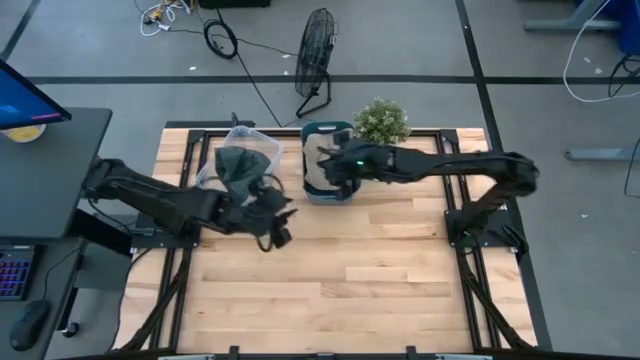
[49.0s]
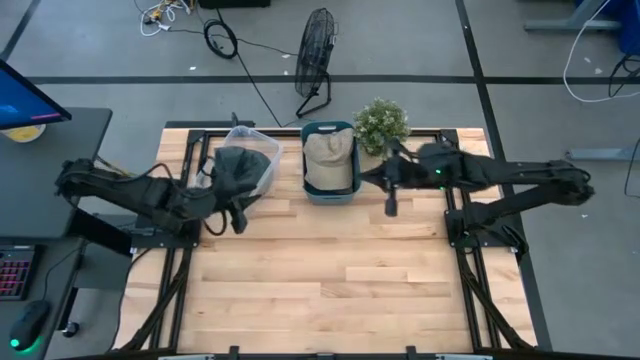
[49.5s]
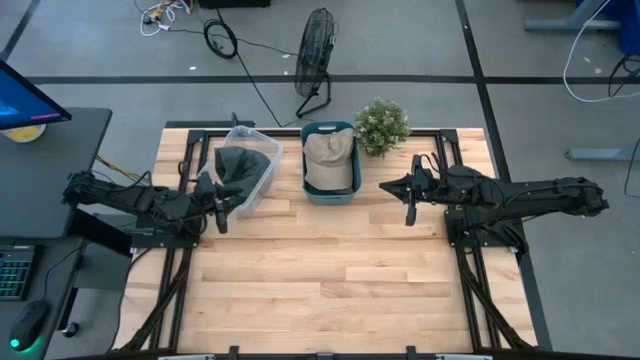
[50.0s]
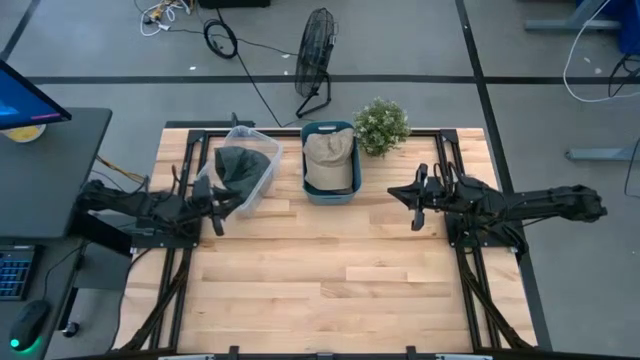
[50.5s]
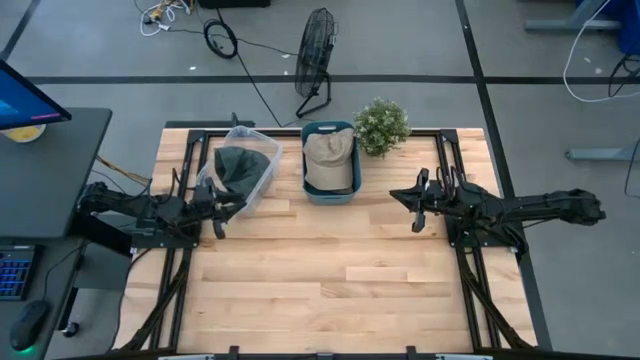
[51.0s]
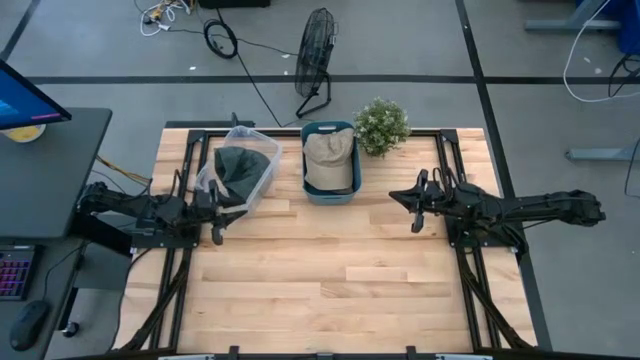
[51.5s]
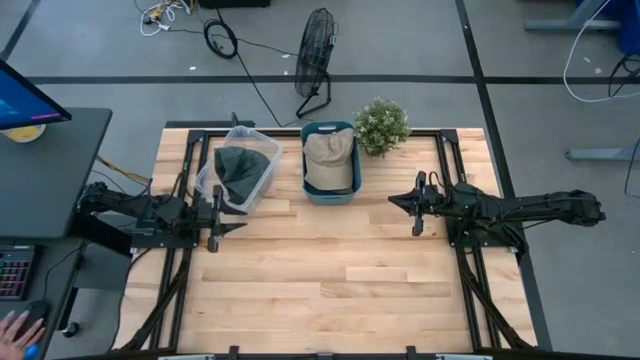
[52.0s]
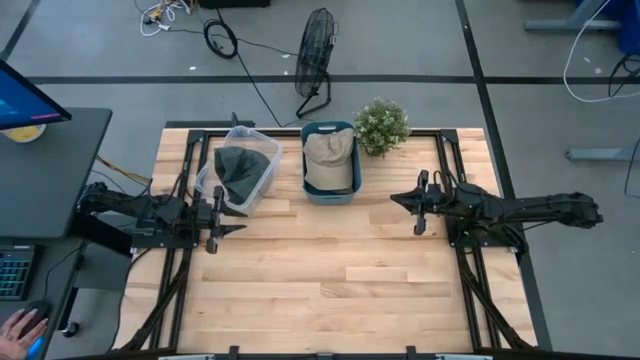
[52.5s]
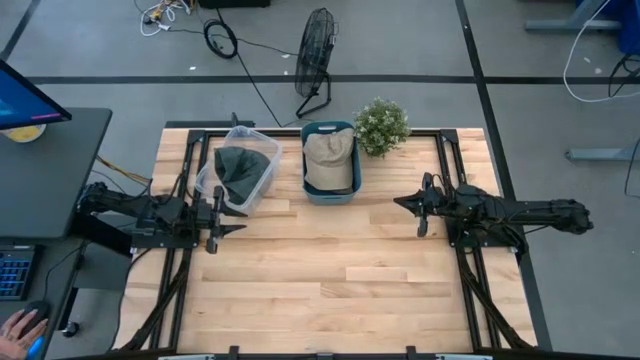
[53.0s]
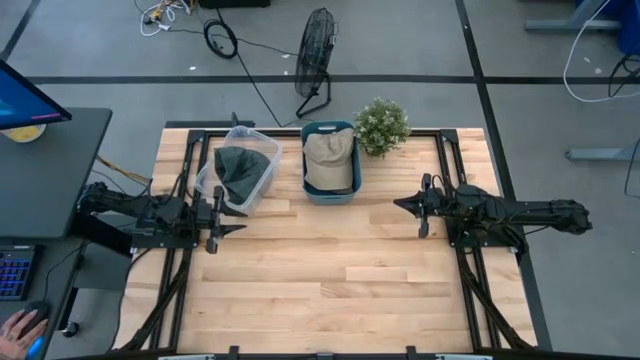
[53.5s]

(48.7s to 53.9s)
Task: Pick & Place hat
Return to Home Position

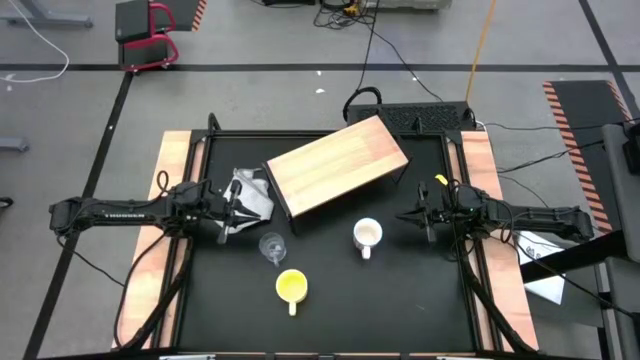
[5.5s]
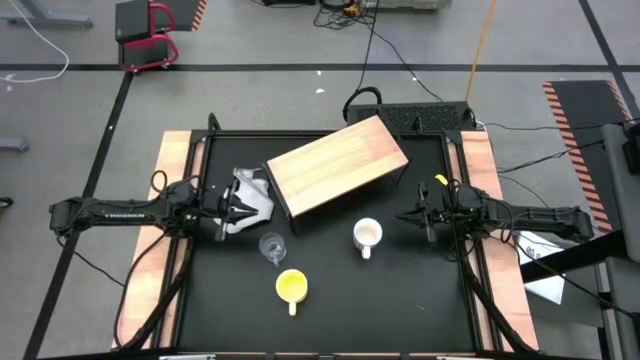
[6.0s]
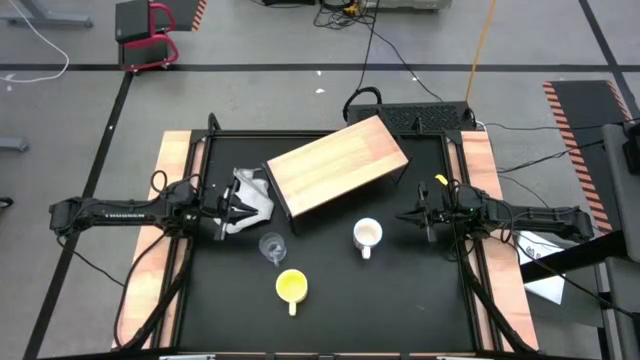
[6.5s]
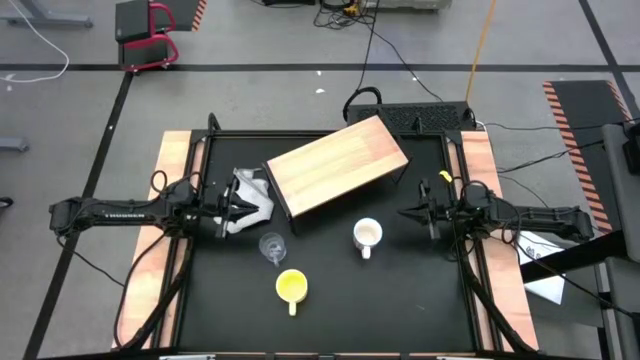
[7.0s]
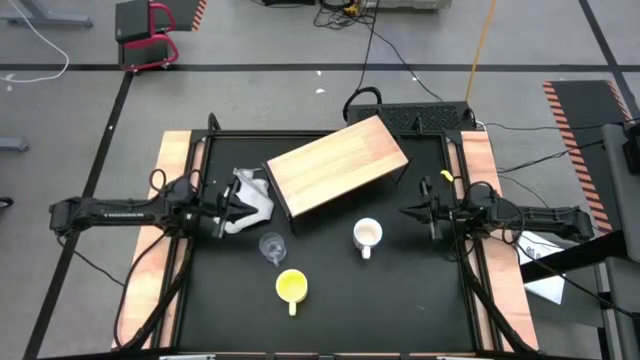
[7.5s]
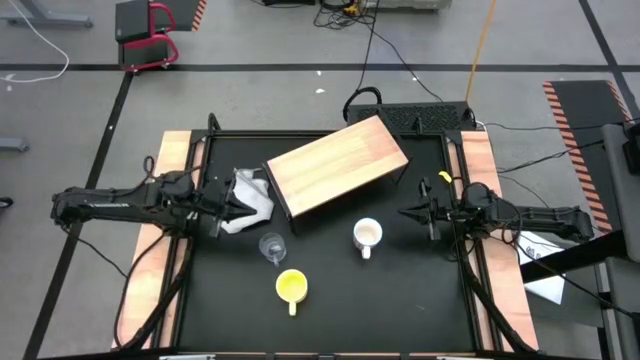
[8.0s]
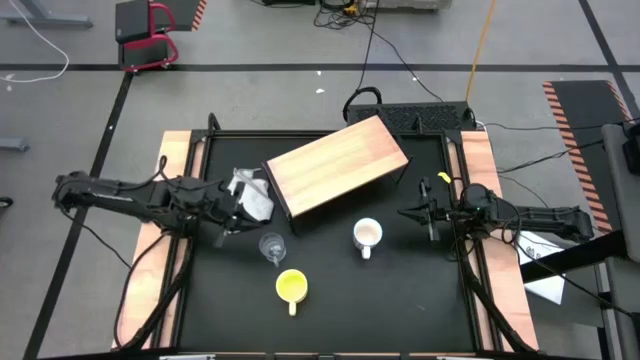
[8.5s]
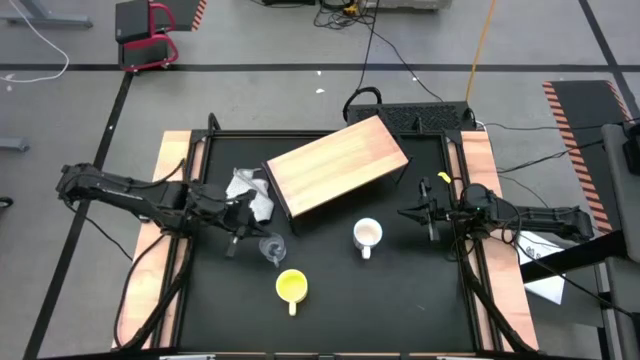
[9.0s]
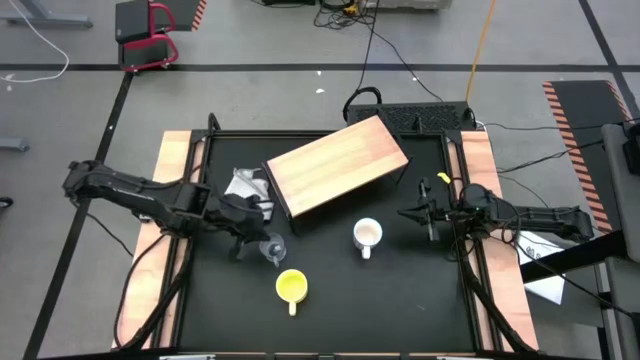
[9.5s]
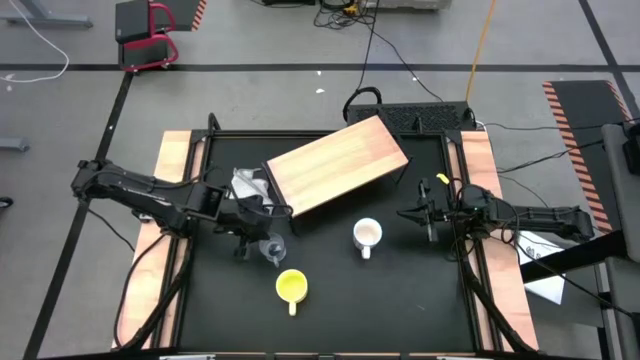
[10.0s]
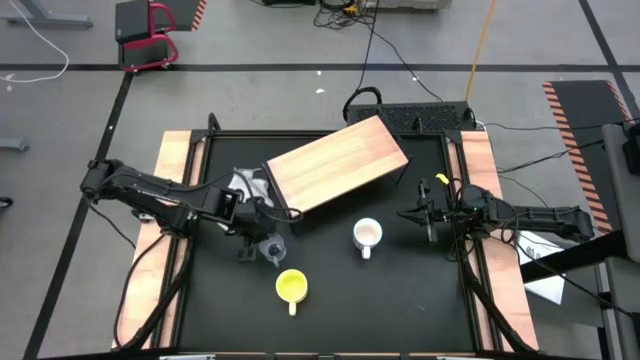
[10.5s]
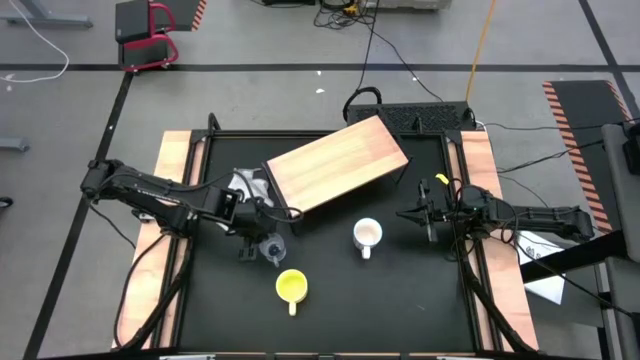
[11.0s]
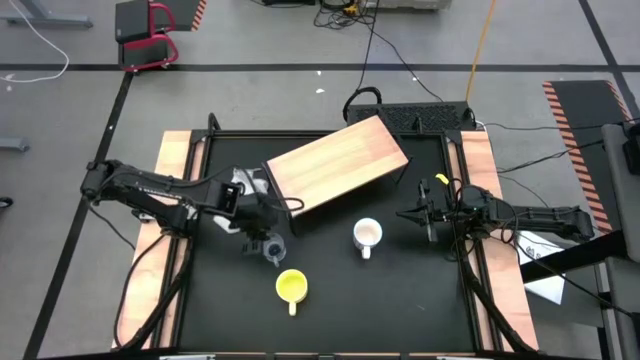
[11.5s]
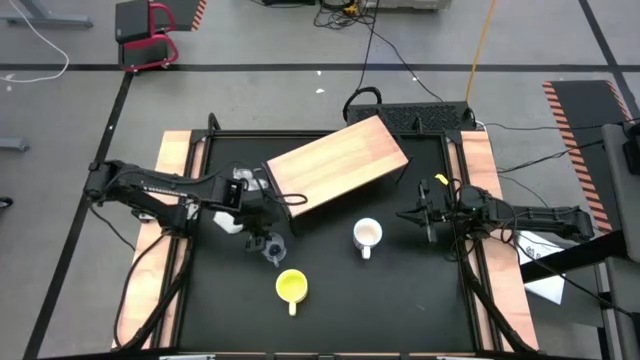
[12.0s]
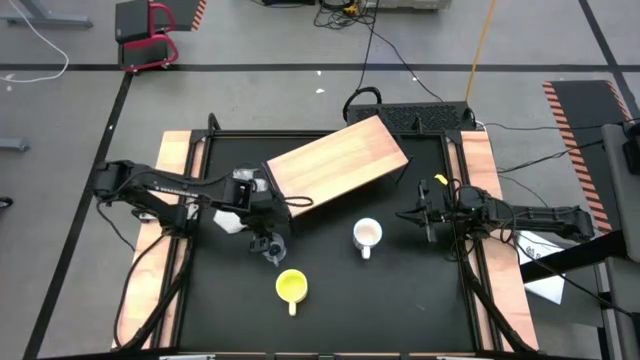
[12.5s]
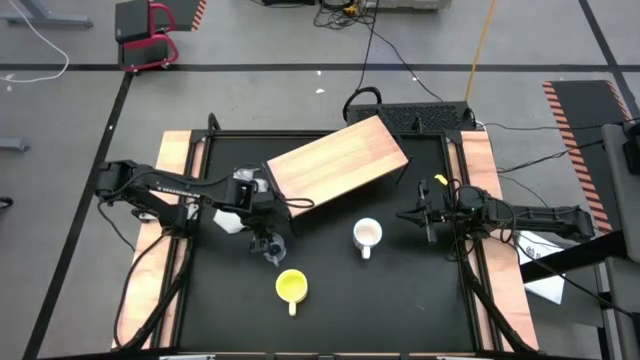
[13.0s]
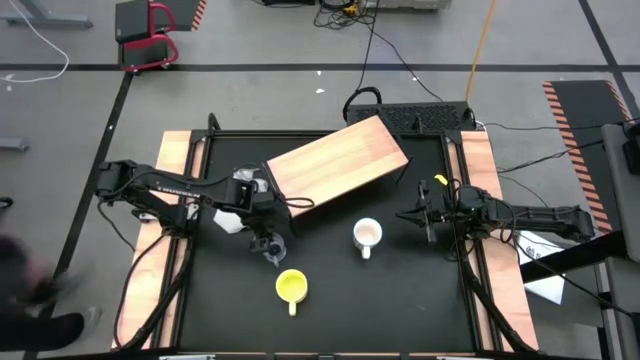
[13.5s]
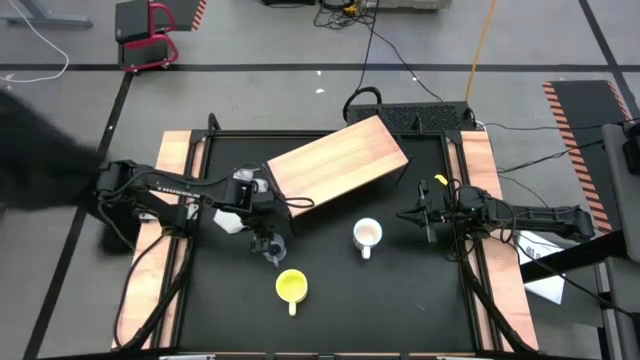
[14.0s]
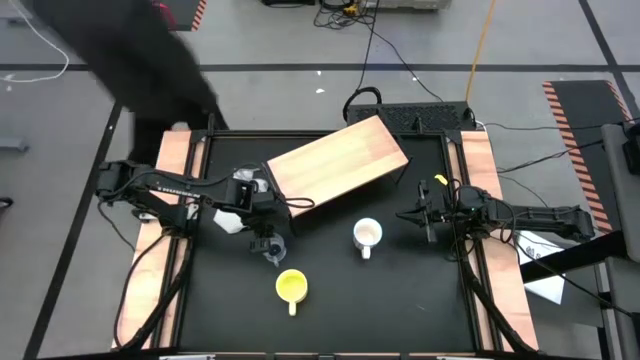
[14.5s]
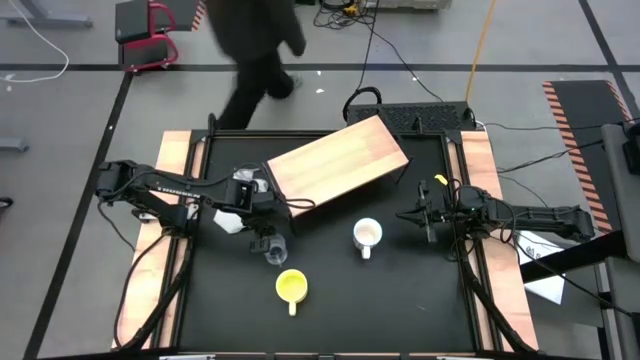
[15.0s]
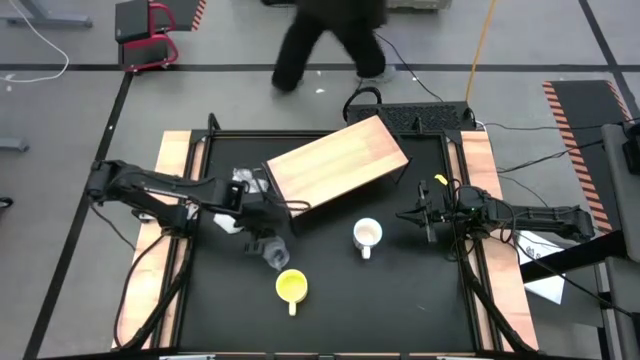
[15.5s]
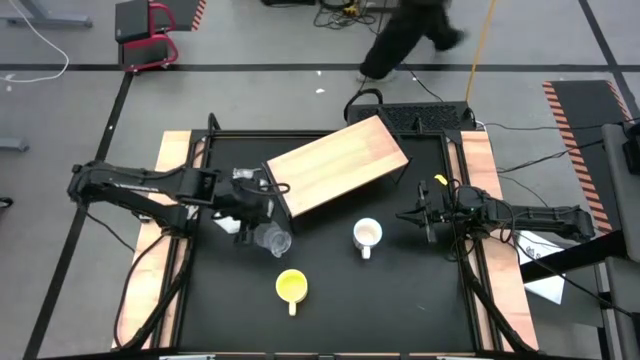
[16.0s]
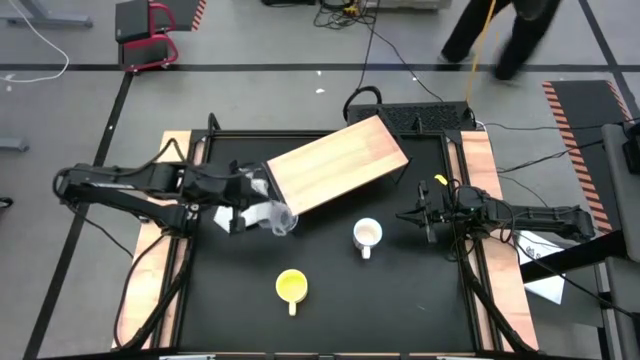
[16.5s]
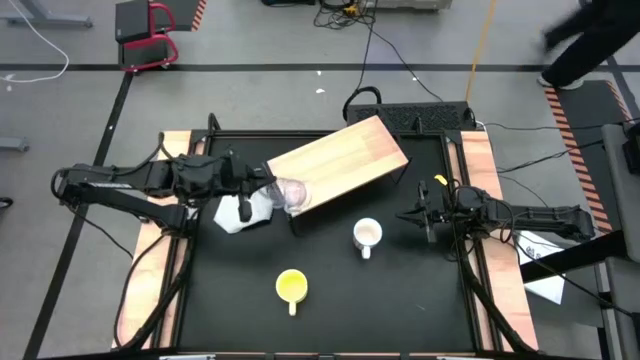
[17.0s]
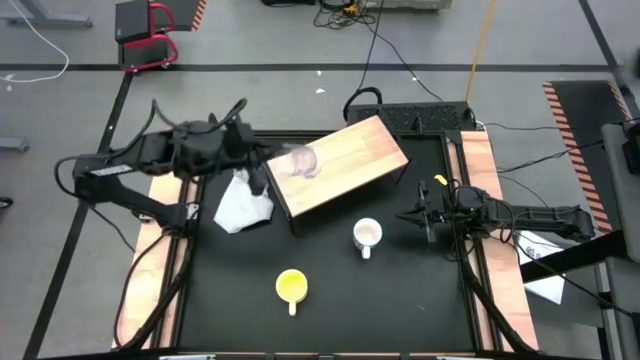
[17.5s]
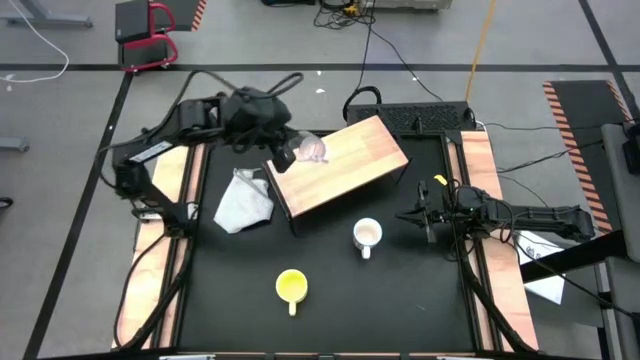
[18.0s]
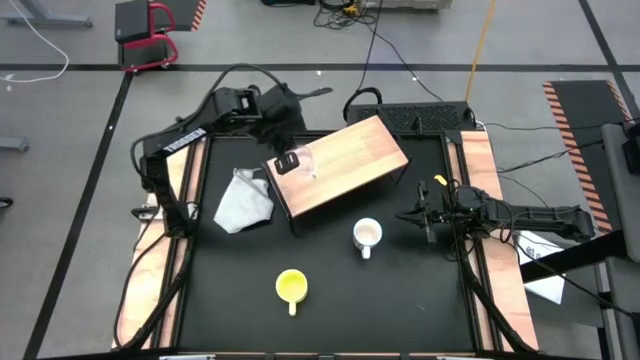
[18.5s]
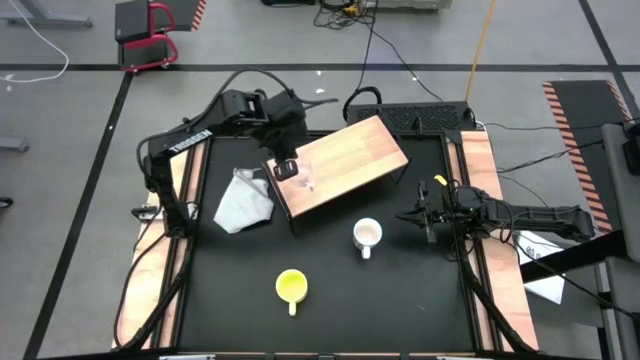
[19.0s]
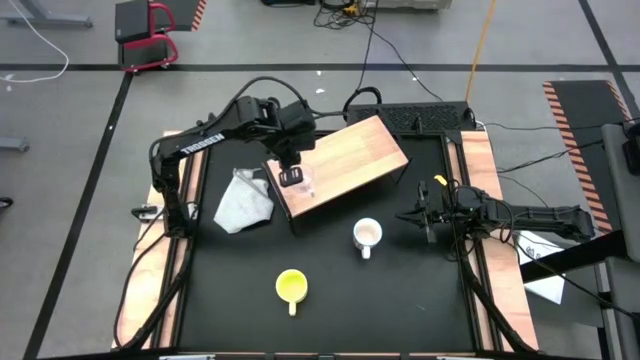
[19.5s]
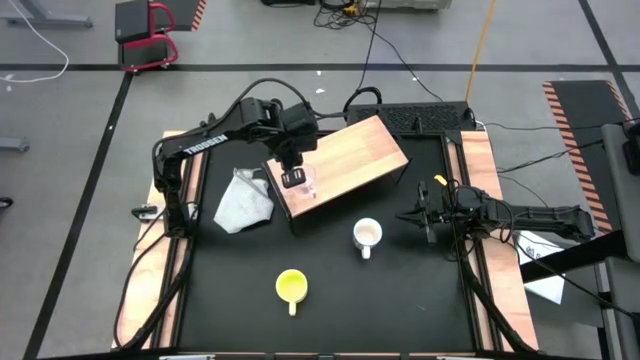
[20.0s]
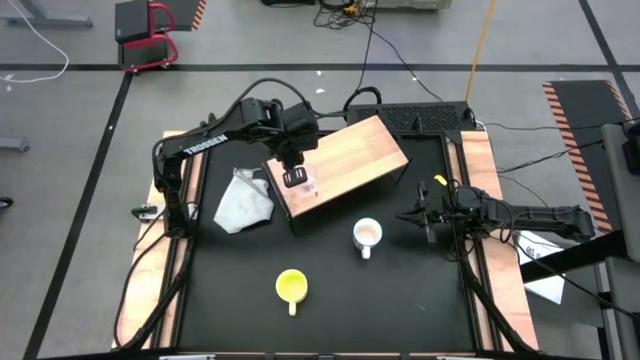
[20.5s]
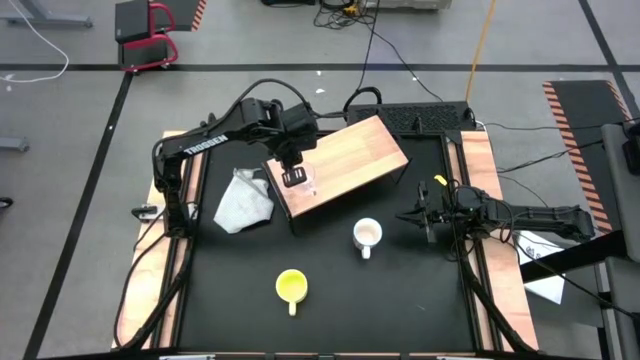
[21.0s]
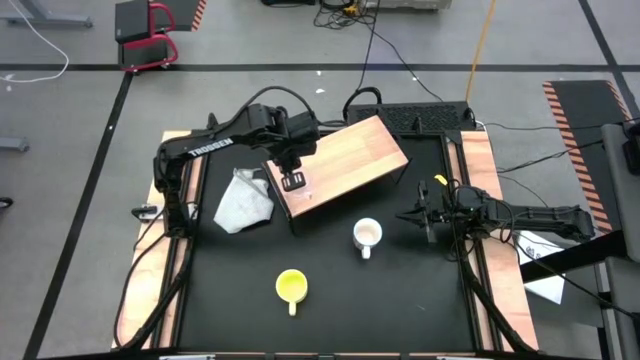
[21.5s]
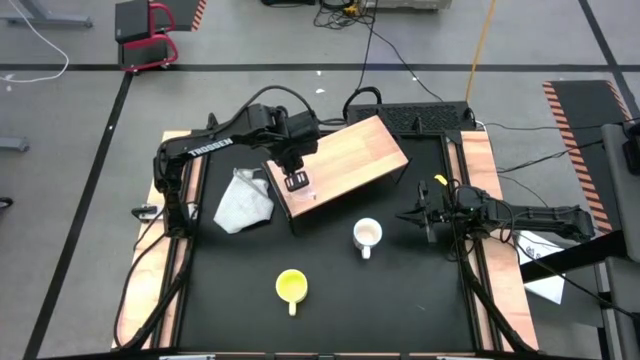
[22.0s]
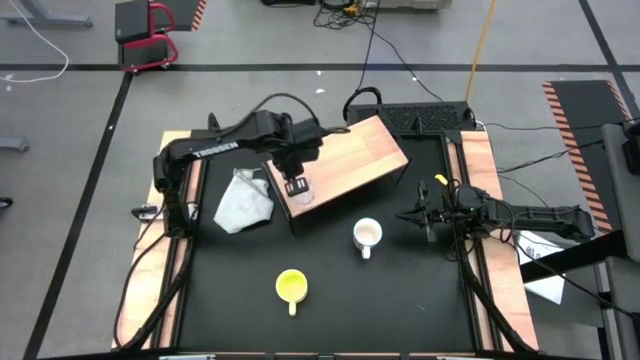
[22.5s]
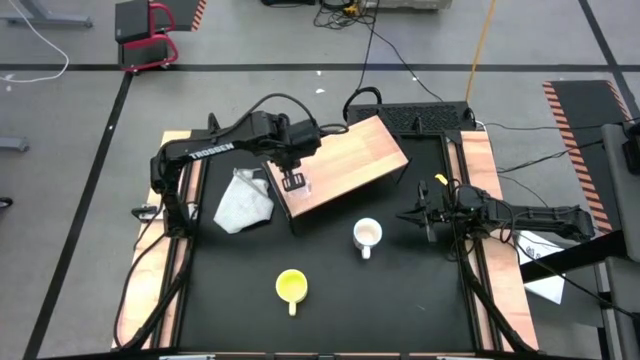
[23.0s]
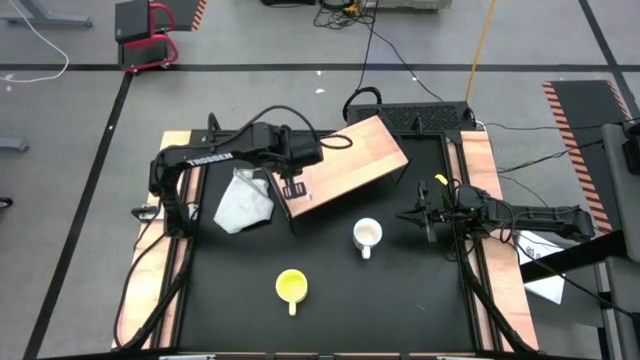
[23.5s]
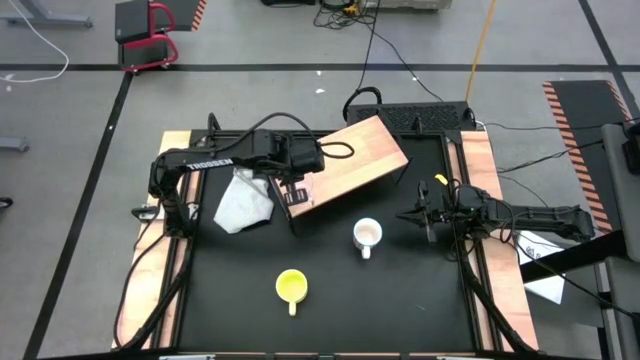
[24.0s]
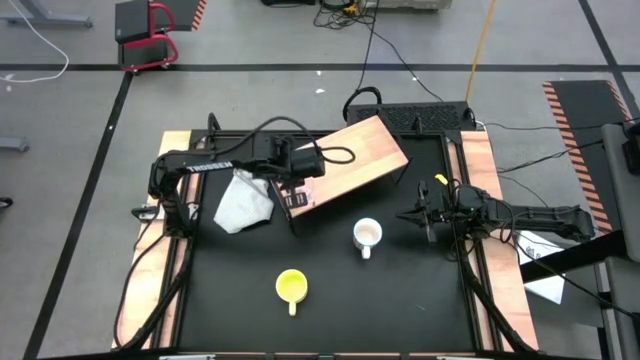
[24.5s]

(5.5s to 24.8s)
Task: Stack small to large cups/mugs on shelf
Put the transparent mug on the shelf
